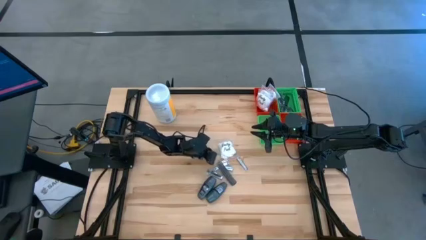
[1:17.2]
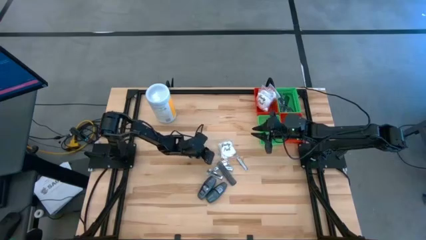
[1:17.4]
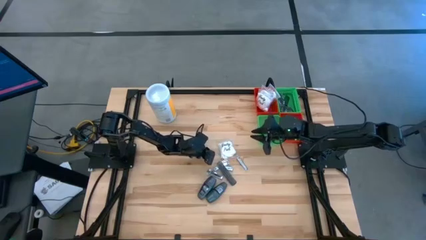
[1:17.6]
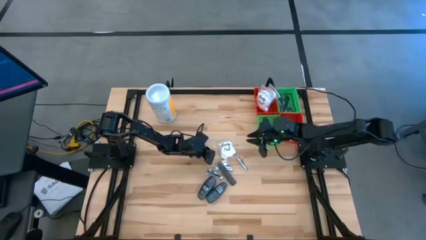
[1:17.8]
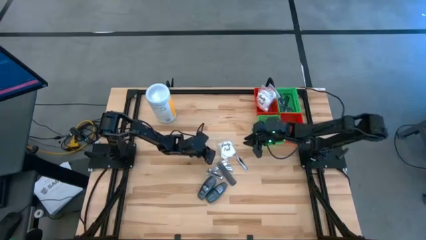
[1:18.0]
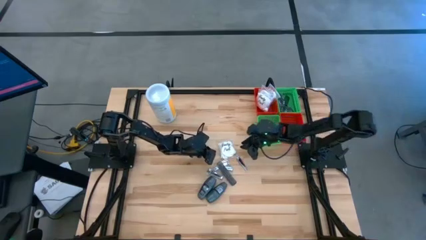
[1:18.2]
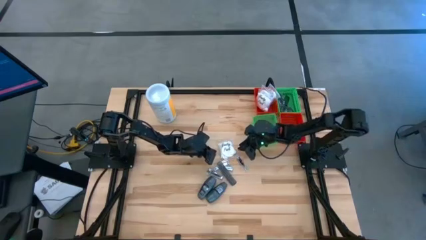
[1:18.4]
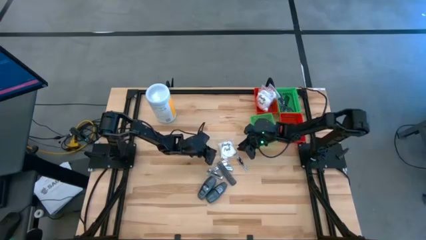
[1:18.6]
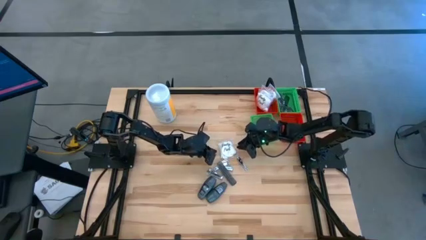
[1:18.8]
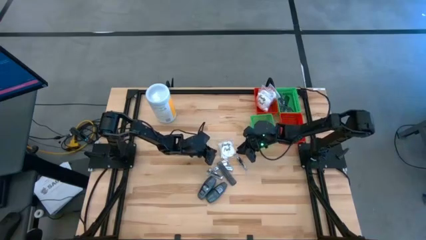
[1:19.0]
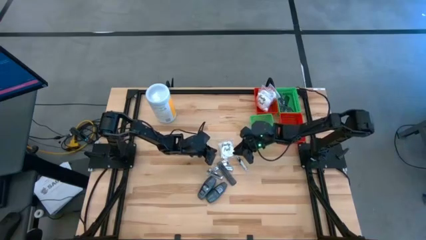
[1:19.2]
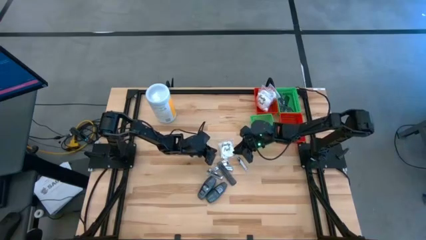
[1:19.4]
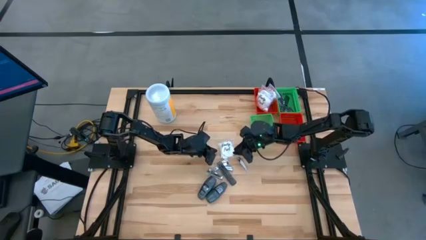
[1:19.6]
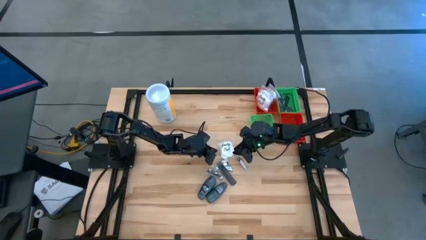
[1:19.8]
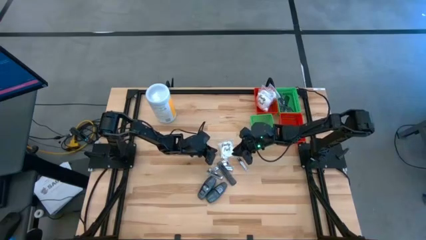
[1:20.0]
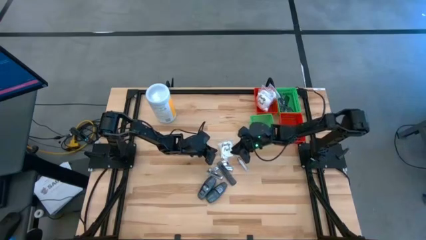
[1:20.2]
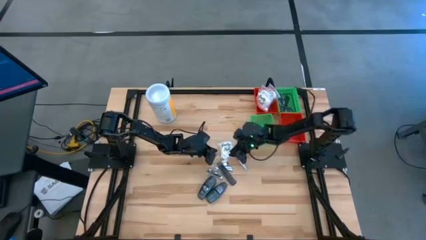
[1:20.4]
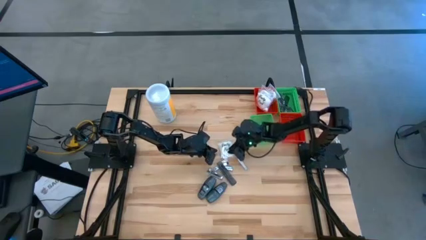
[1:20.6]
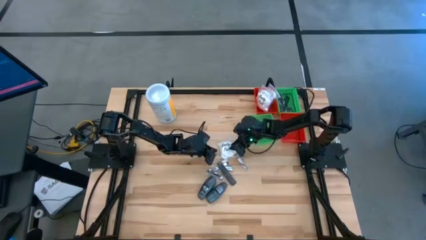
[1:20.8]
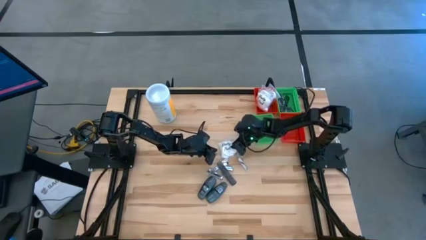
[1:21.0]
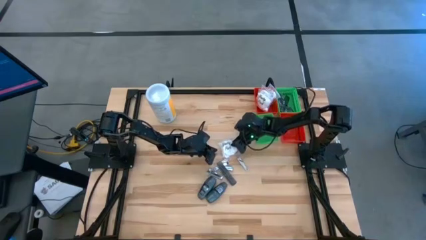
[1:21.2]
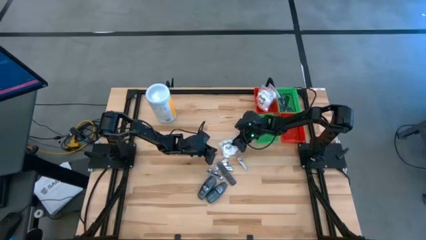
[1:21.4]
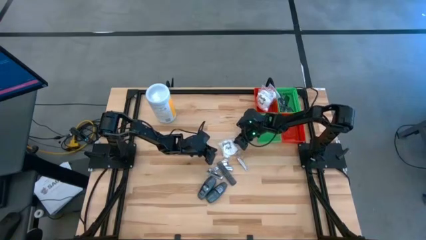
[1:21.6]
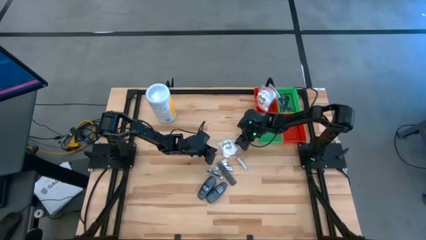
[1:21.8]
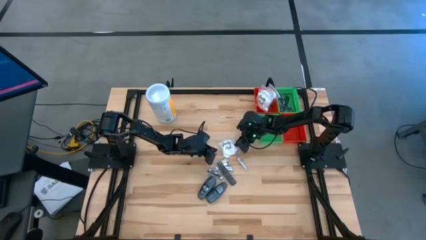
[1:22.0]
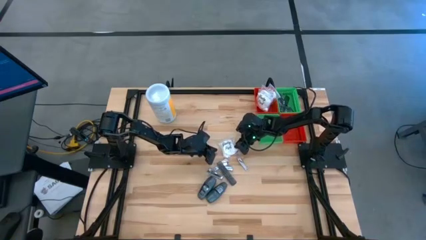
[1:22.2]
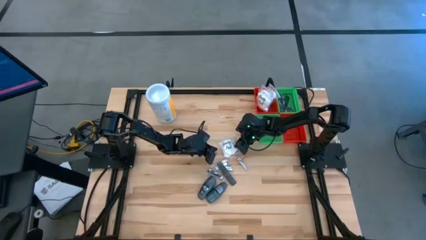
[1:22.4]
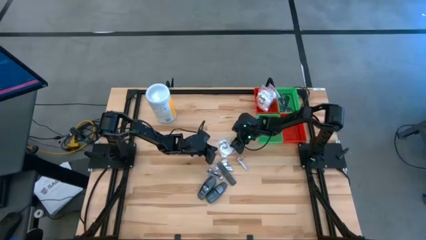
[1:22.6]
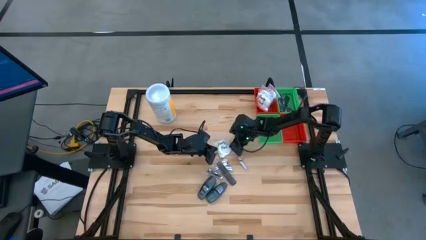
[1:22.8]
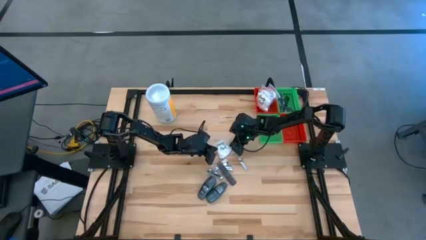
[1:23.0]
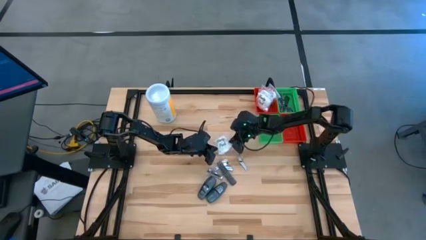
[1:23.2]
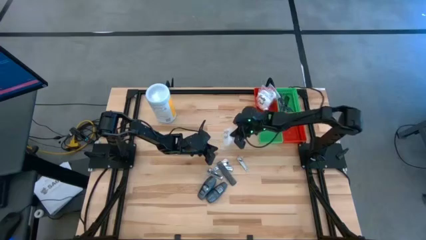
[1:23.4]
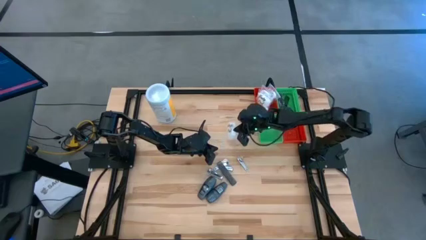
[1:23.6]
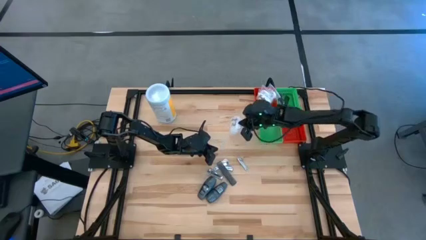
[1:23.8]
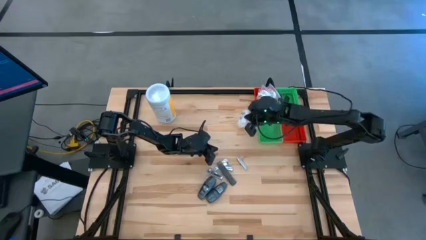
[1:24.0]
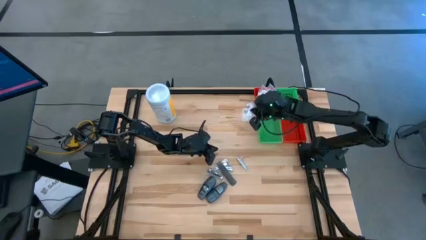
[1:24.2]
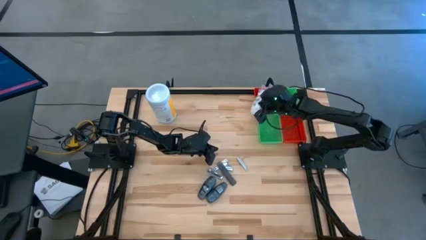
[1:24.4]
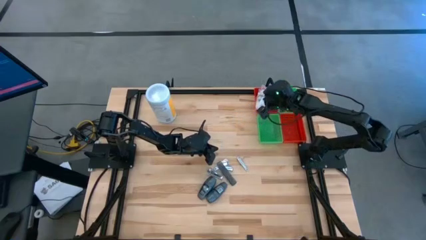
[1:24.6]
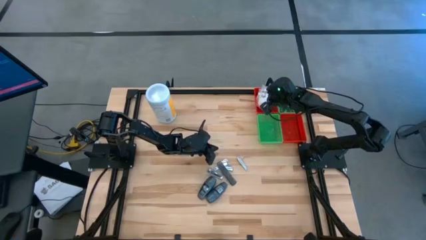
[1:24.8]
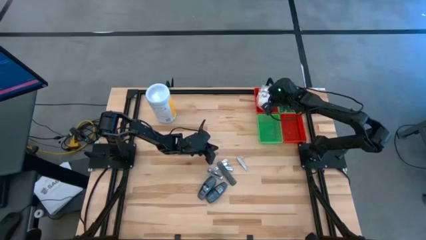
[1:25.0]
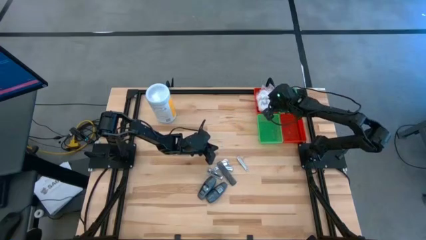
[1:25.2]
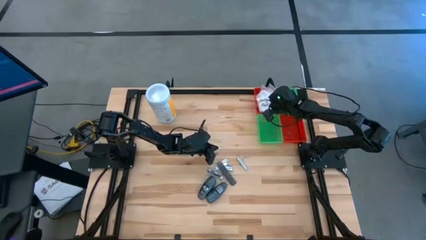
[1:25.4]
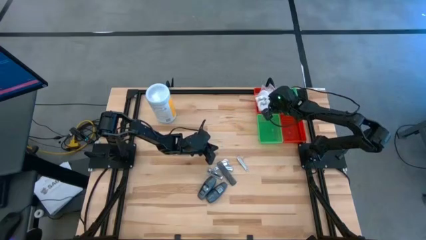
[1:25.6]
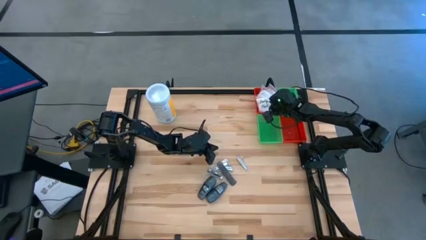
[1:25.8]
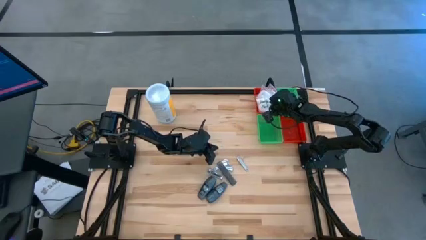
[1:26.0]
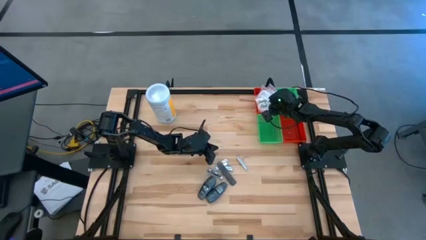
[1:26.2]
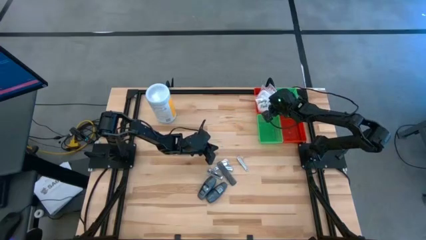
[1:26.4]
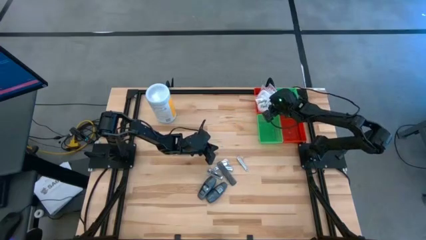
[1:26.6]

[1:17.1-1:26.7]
Task: Pick & Place Travel size toiletries
Put the white cotton pack into the top red bin

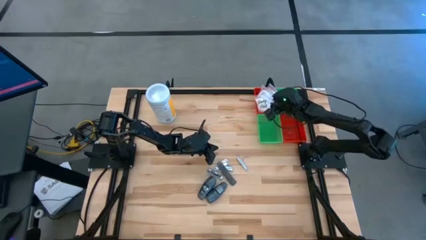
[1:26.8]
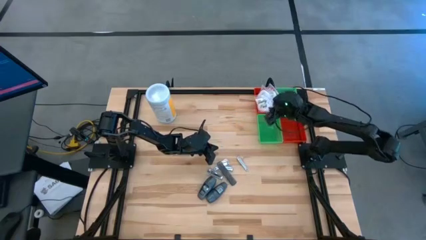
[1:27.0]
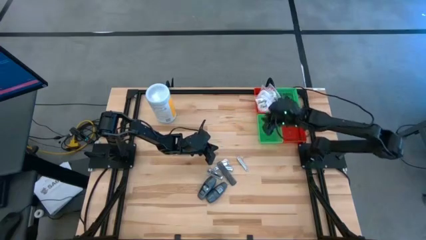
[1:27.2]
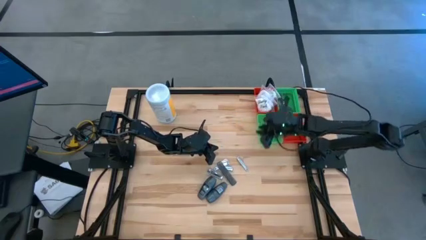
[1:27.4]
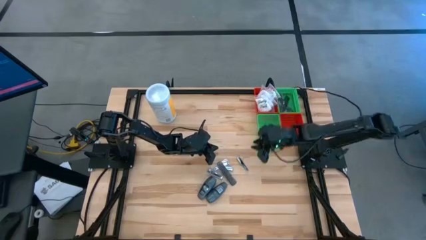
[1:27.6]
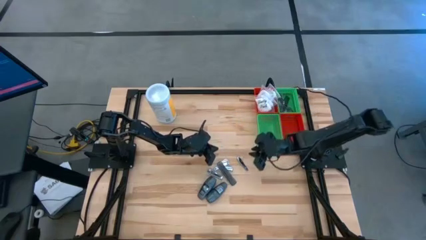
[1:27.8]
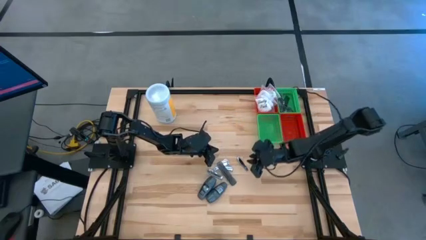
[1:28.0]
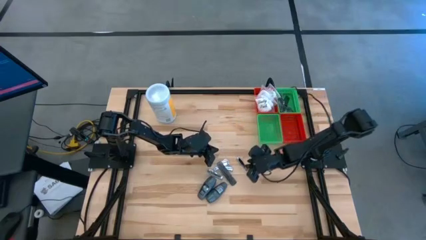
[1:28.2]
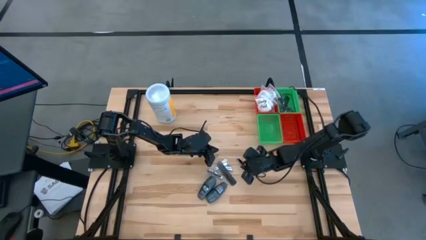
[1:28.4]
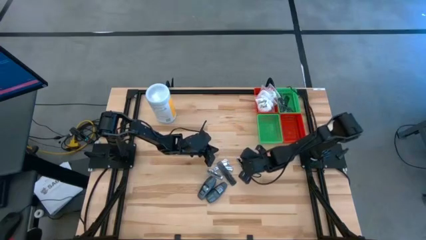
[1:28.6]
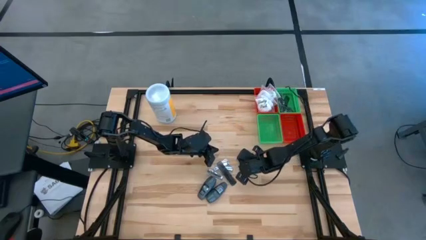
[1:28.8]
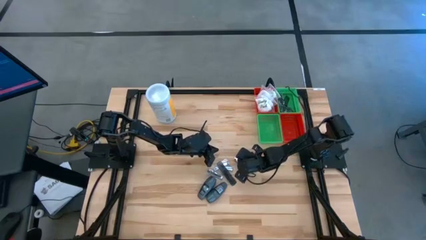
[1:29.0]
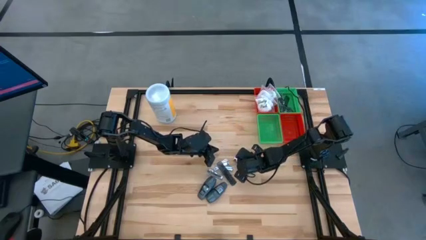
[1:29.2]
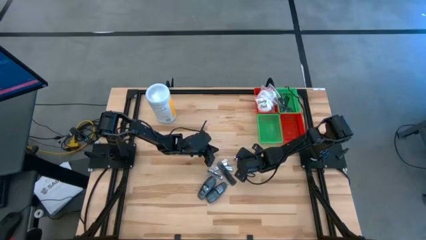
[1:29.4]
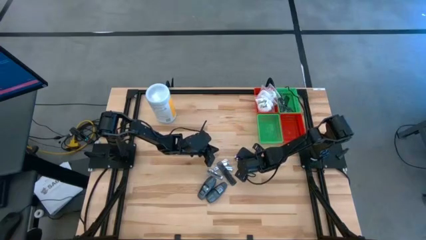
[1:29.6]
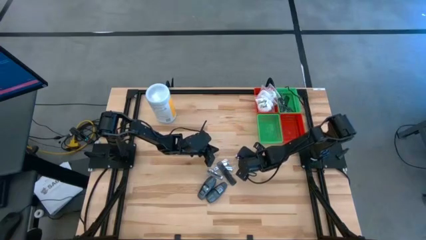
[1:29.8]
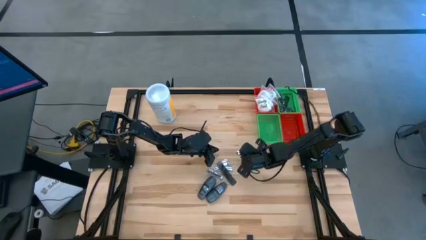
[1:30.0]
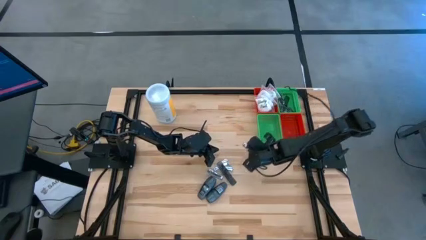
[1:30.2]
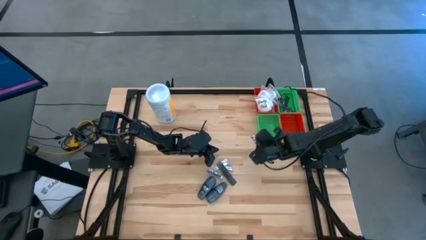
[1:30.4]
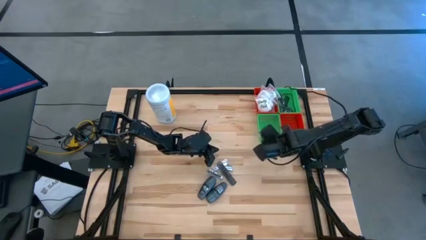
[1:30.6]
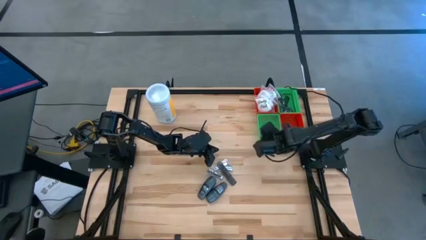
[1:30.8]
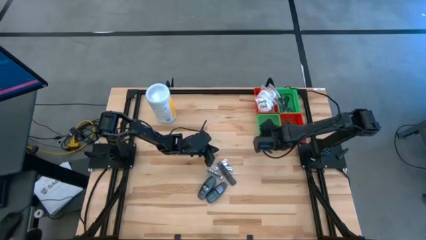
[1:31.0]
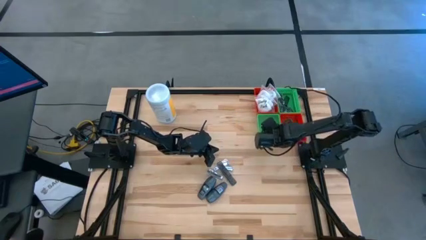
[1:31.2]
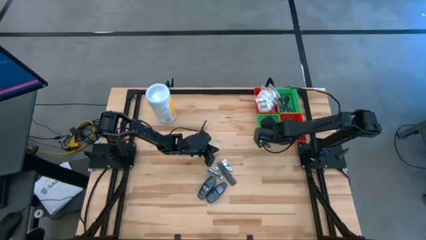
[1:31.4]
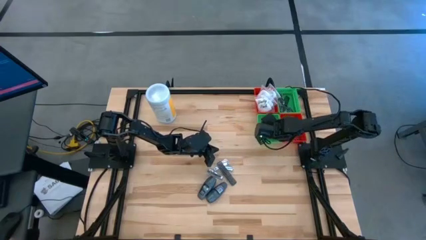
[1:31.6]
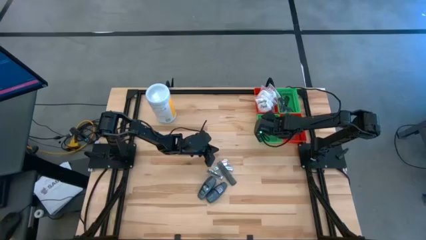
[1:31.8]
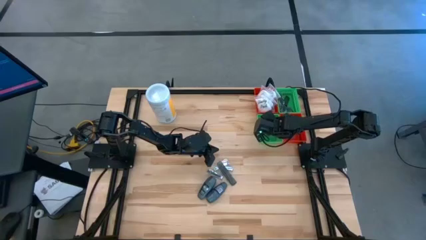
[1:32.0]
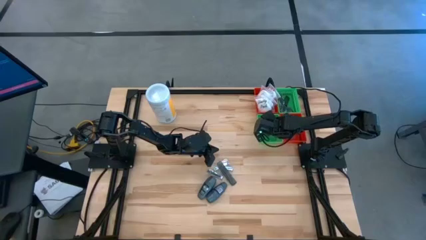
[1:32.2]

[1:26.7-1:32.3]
Put the silver nail cutter into the bottom green bin
